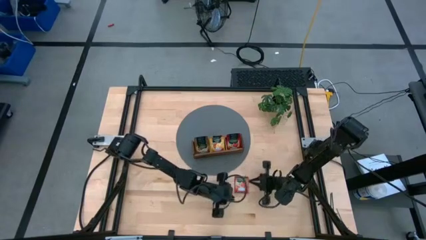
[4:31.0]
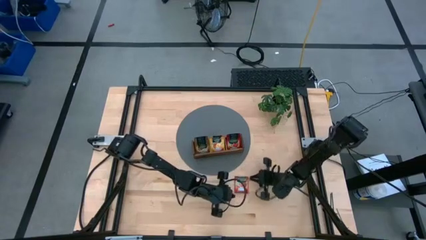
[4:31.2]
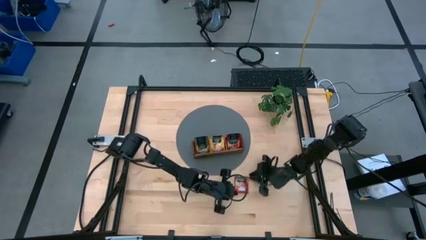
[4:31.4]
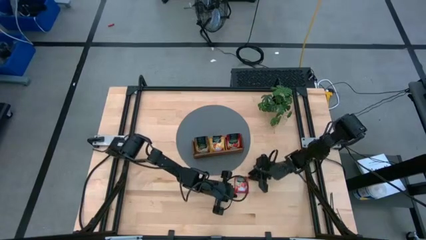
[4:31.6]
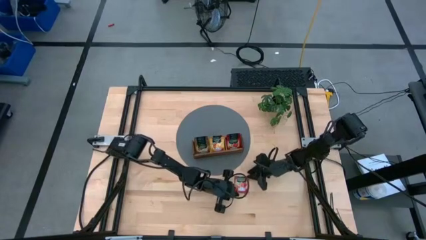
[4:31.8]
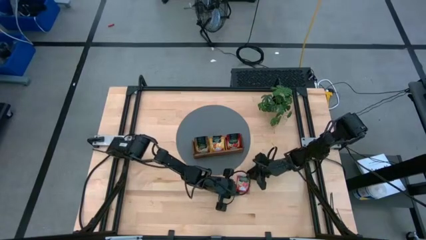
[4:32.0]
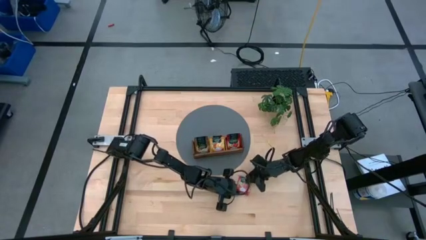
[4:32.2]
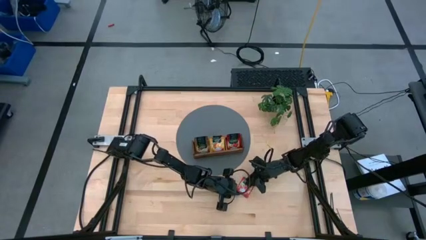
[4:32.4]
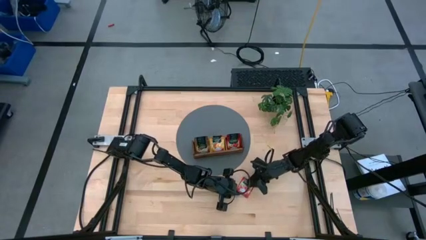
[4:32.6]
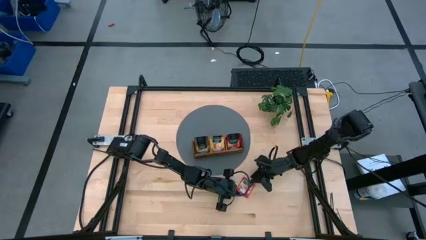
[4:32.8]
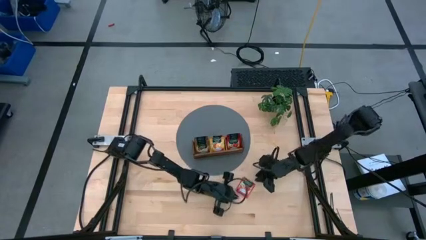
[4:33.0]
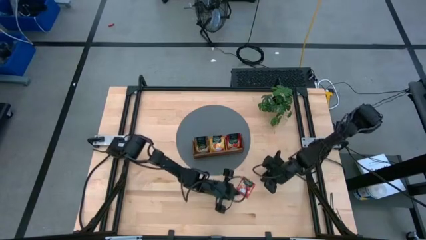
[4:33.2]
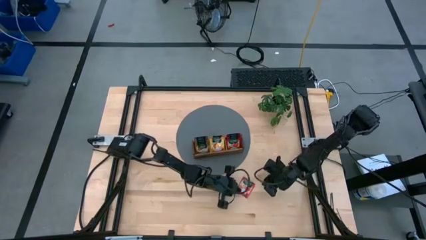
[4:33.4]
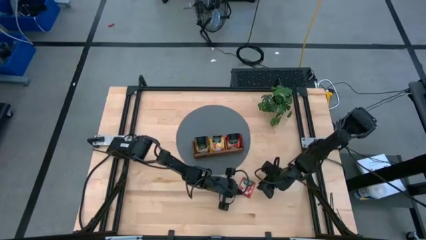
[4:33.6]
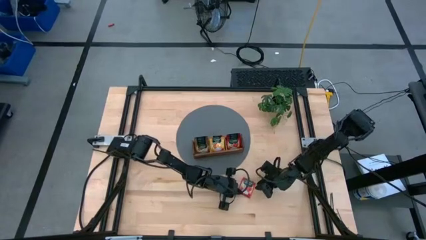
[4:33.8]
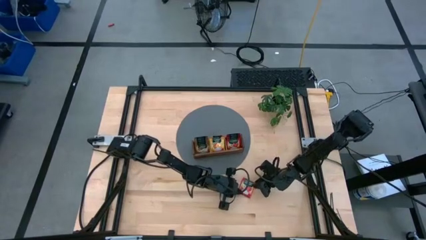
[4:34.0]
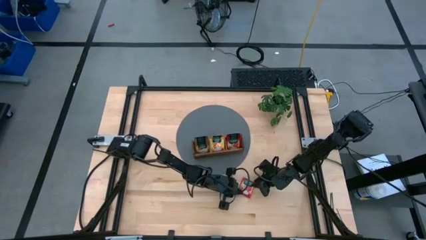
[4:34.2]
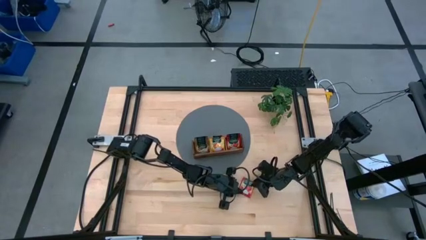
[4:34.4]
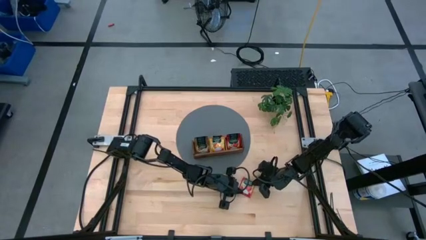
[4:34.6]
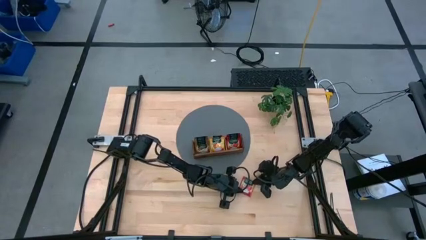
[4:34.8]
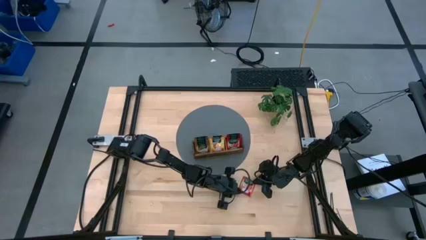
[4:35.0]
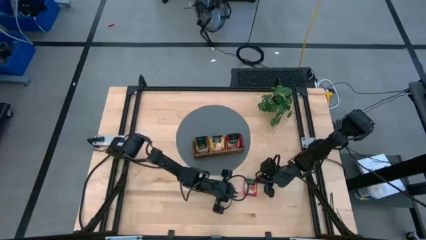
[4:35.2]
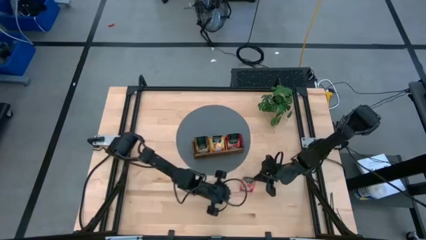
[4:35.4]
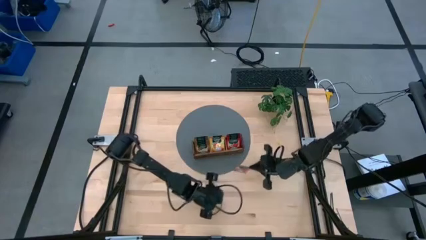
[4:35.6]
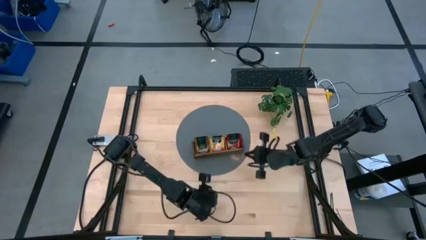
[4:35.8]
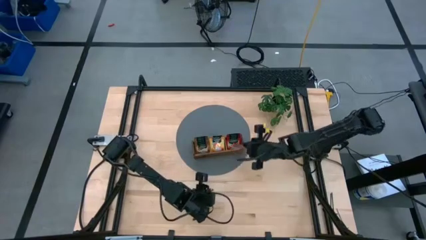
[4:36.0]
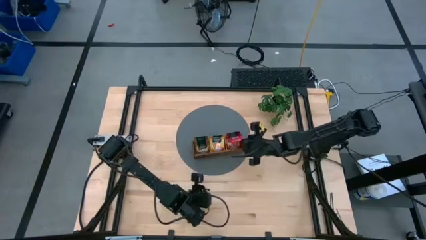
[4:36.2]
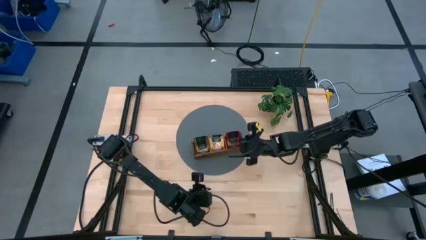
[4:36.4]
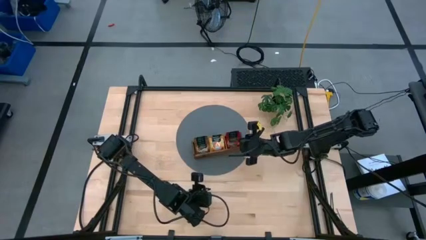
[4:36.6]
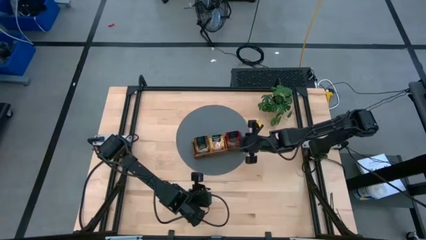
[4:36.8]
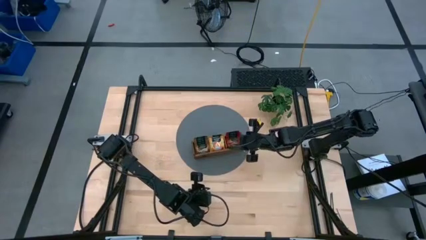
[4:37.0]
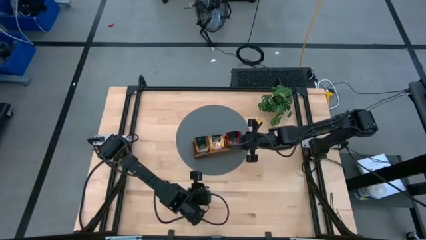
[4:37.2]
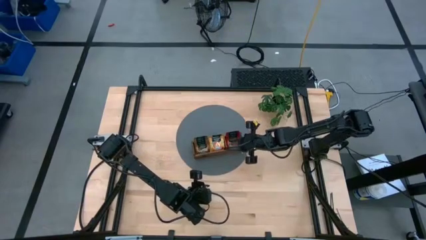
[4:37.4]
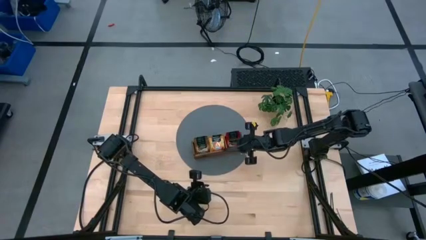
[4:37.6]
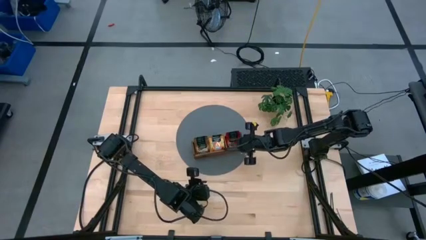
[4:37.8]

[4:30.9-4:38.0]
Task: Pick & Place Tea
Put the red tea bag into the right section of the wooden organizer

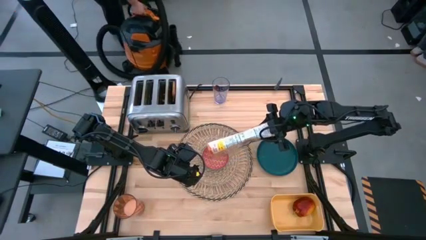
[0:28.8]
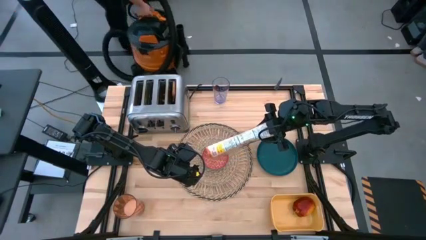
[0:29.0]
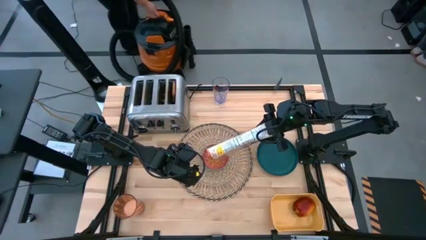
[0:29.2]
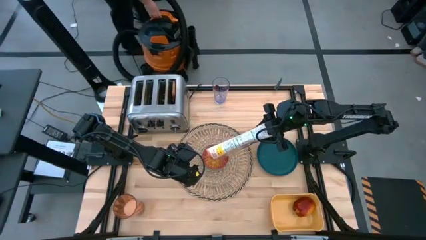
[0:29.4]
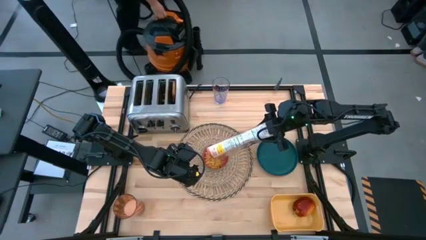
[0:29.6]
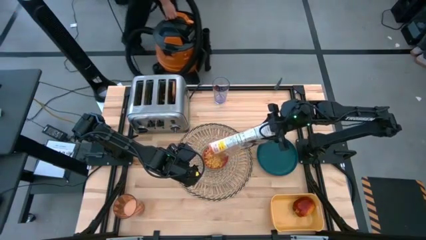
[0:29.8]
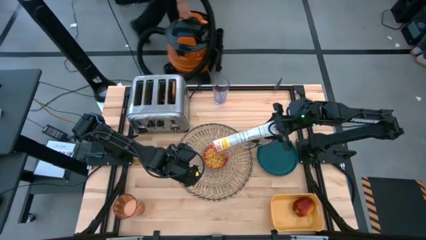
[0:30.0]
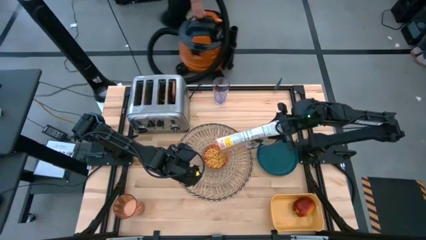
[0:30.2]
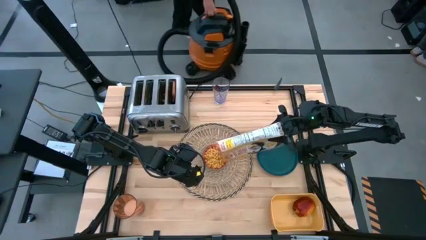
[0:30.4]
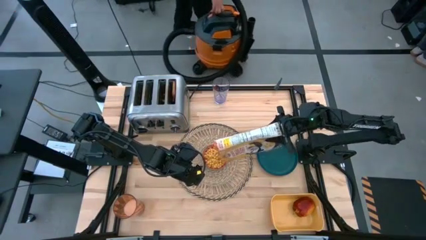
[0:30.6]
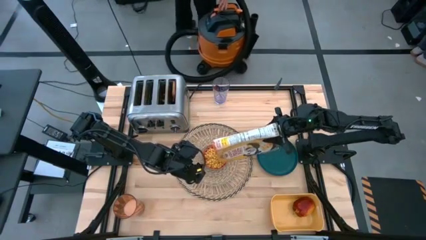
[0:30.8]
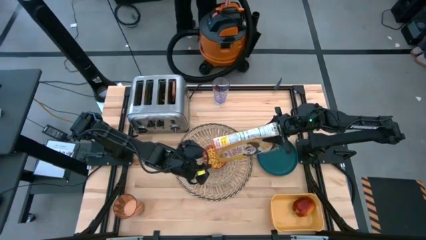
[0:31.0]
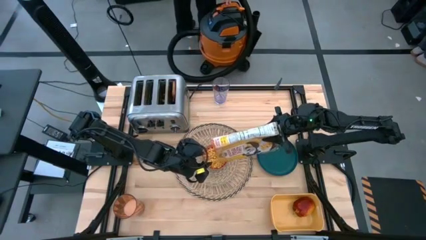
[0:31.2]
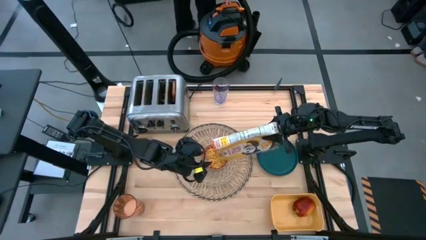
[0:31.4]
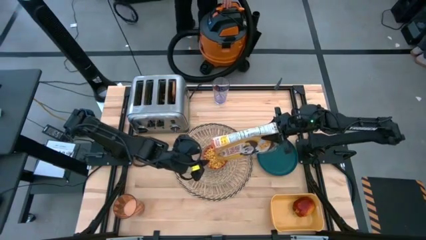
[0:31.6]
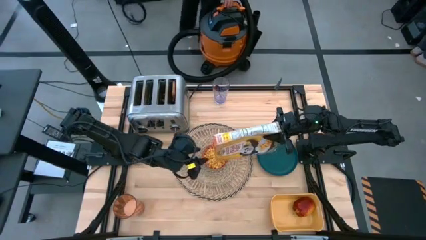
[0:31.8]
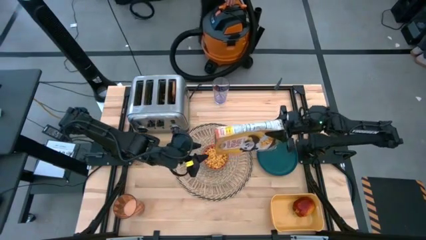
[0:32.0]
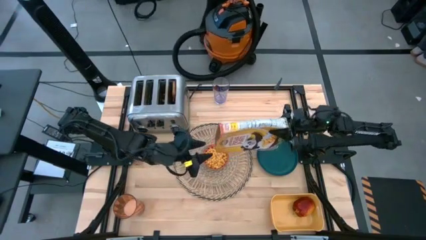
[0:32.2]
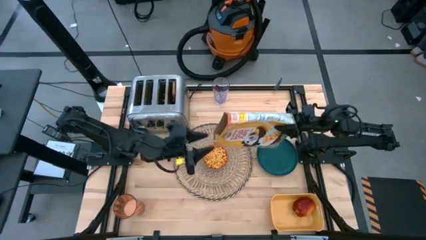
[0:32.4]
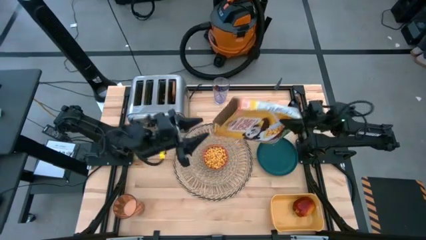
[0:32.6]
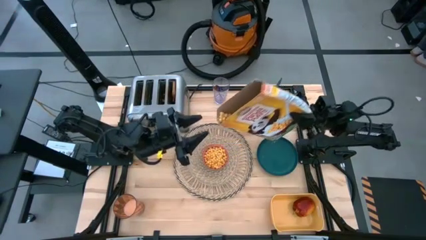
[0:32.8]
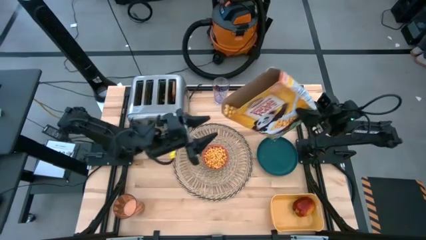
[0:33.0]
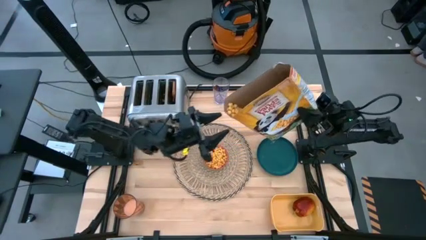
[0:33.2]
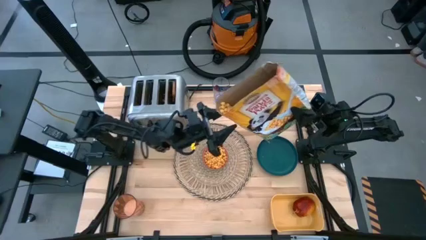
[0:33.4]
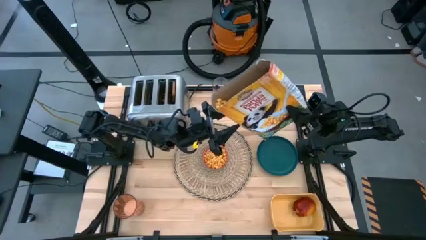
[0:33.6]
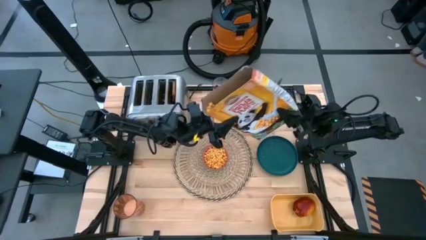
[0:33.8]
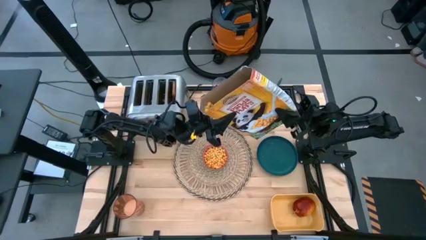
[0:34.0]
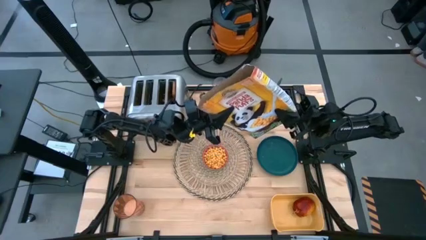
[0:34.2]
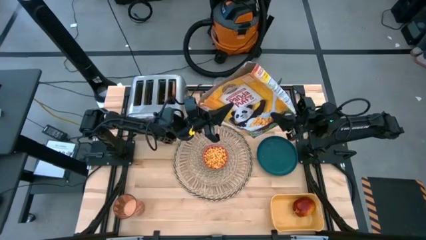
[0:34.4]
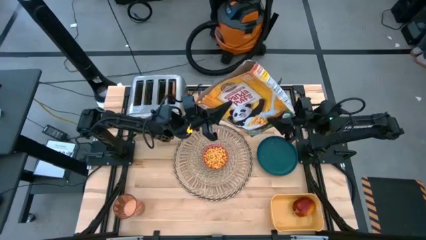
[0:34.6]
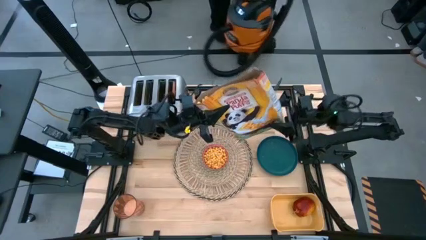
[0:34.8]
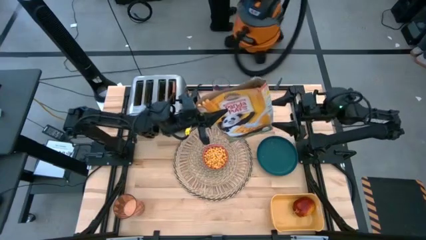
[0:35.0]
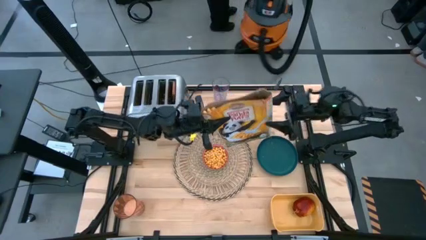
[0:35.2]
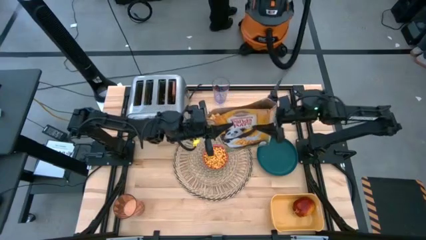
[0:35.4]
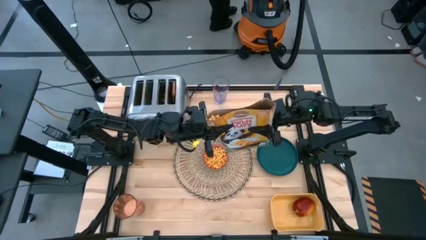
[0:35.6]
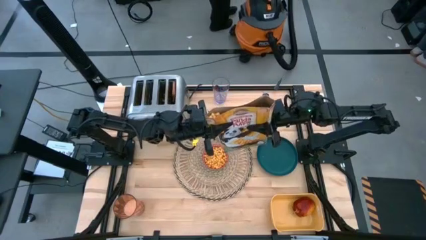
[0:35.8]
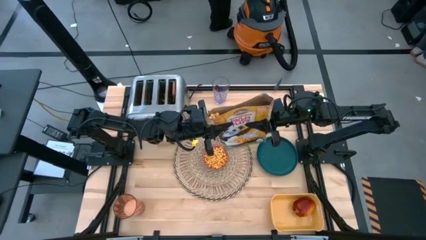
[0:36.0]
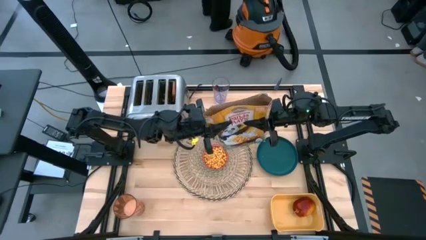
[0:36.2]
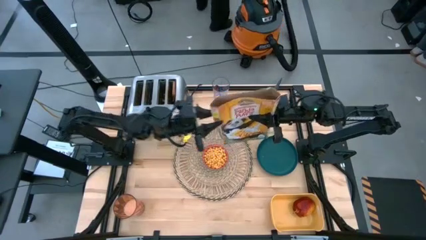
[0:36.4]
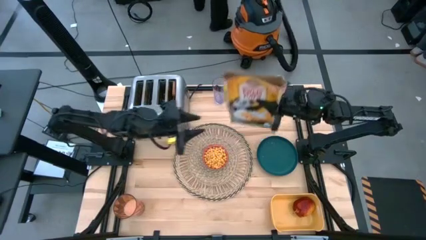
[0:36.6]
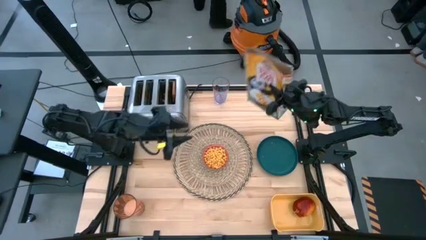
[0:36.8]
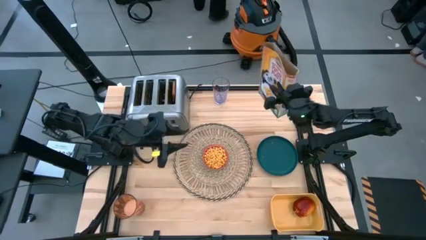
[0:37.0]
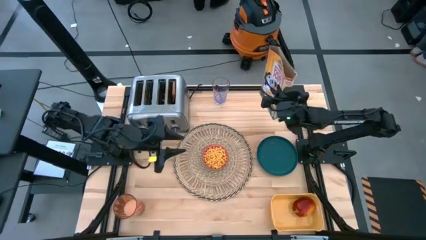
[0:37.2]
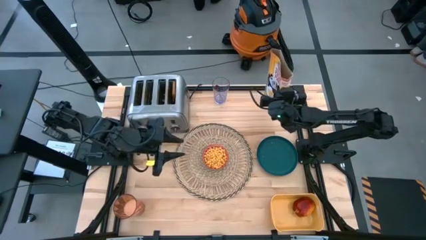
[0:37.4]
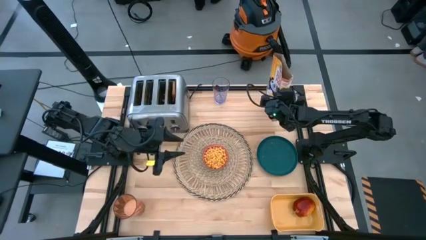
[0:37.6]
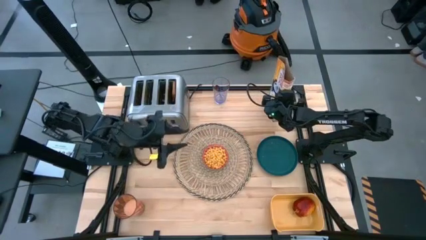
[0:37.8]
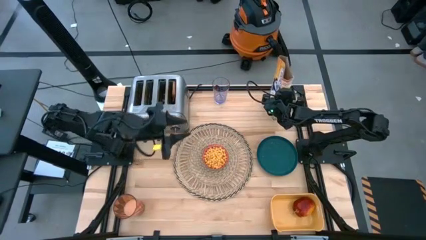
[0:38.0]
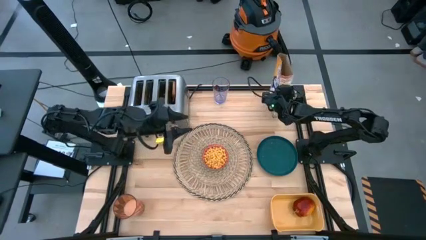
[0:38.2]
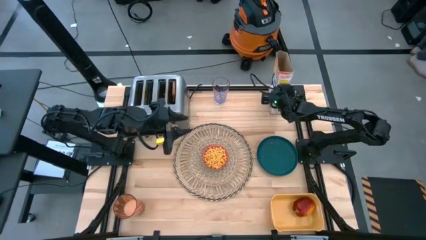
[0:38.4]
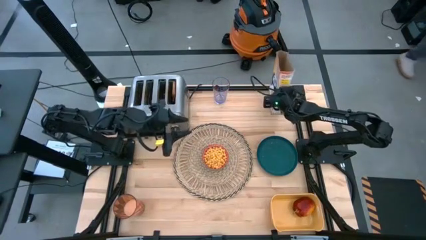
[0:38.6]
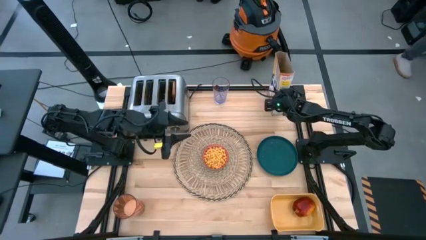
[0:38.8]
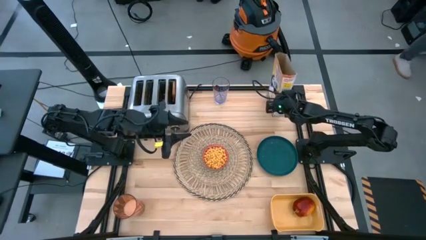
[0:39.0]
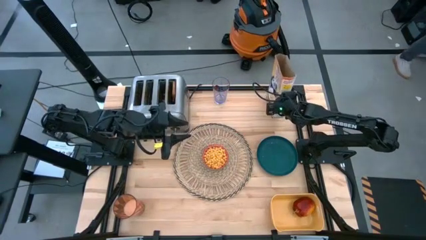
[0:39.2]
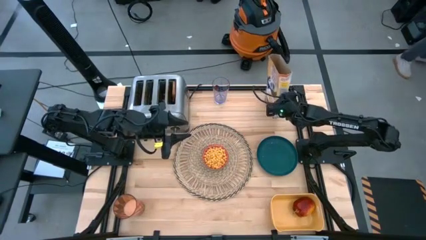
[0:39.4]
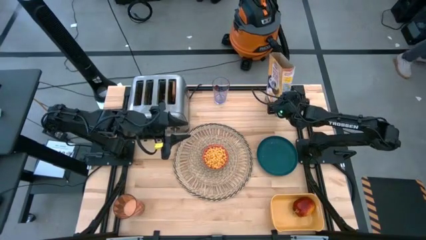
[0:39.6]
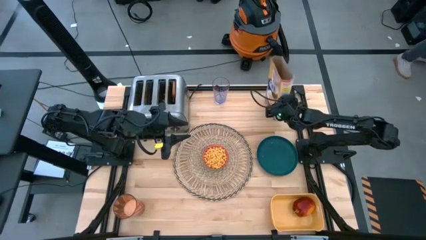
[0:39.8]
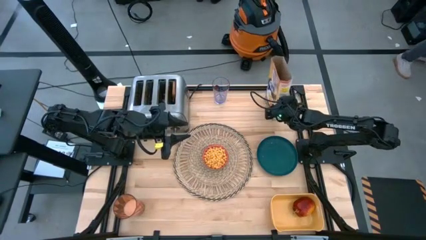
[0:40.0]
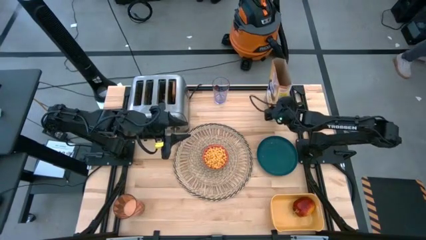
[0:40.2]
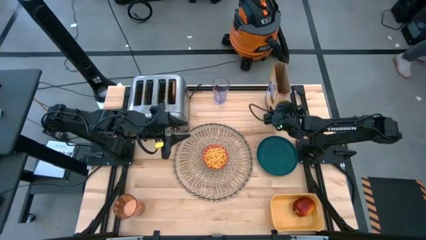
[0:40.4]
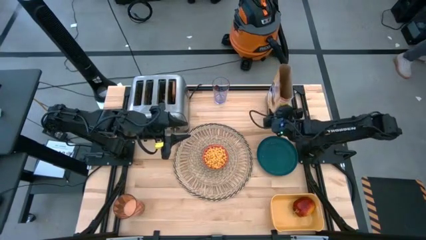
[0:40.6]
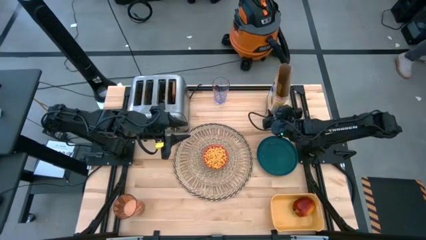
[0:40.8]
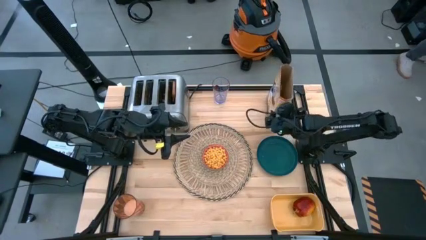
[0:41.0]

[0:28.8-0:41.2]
Task: Arrange a breakfast setting
Pour the cereal into the red bowl
